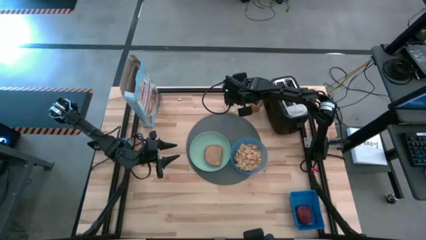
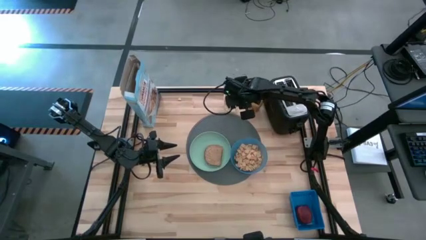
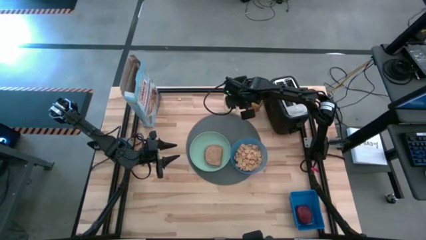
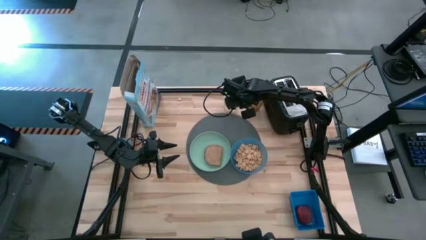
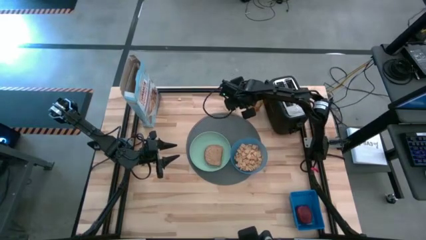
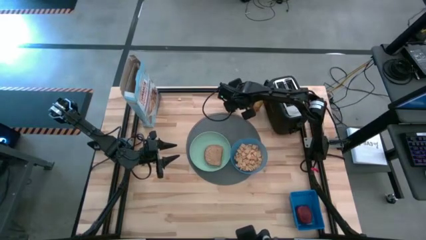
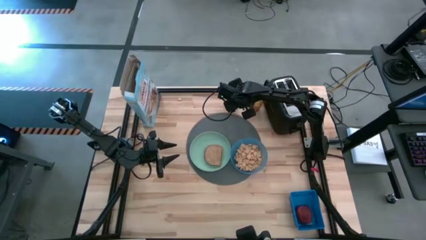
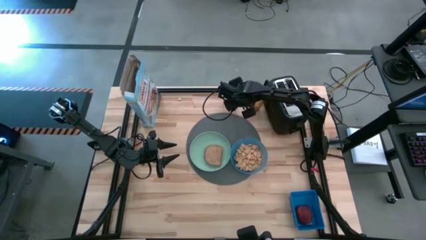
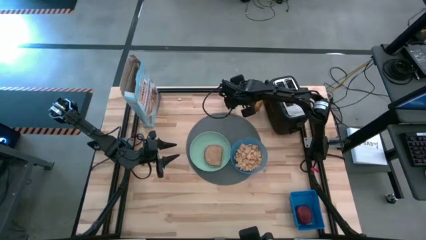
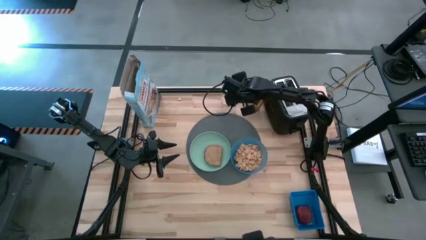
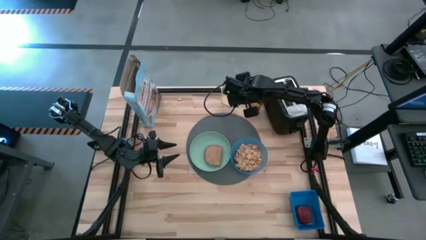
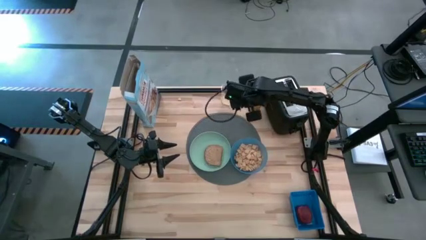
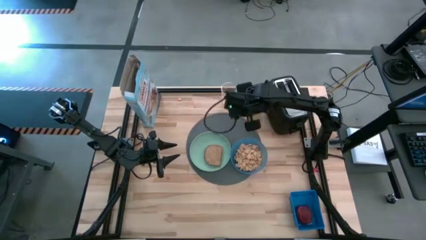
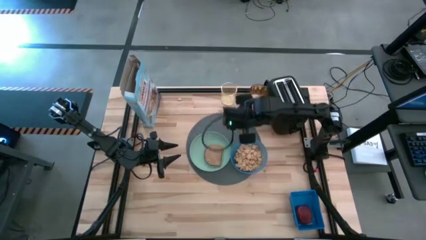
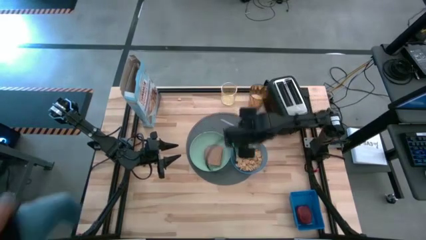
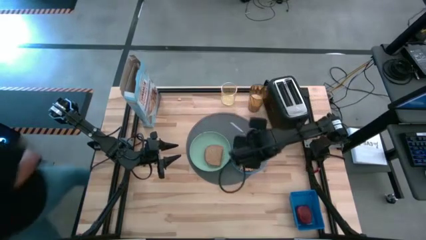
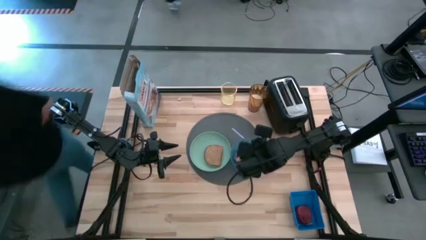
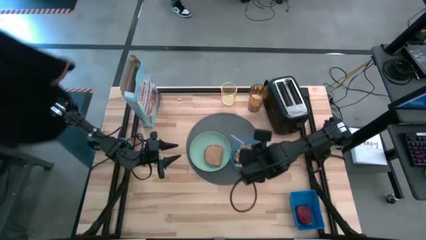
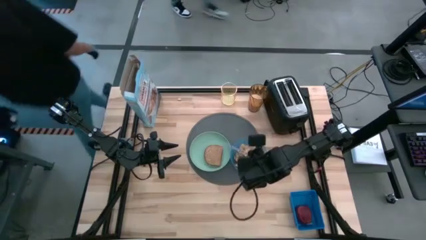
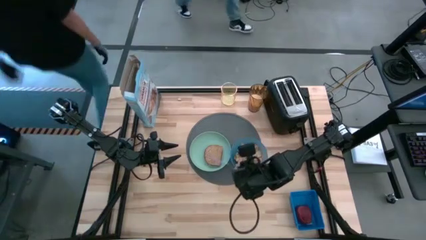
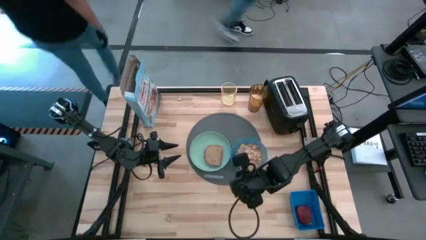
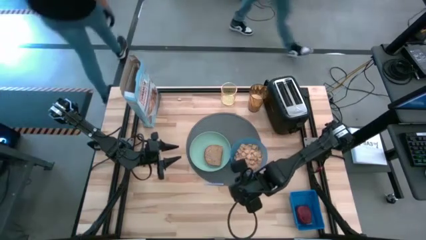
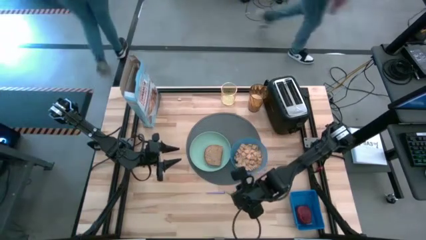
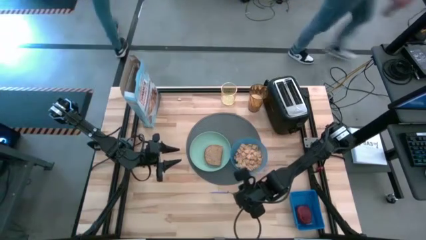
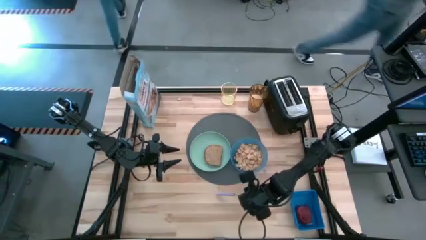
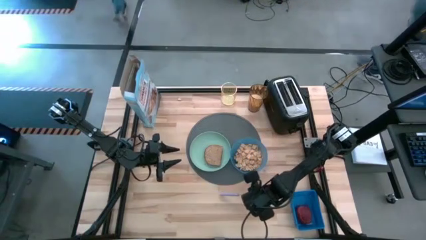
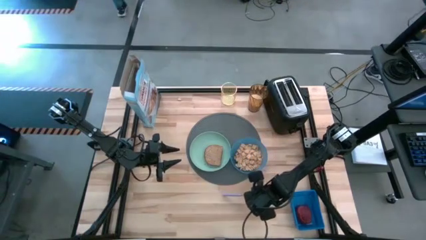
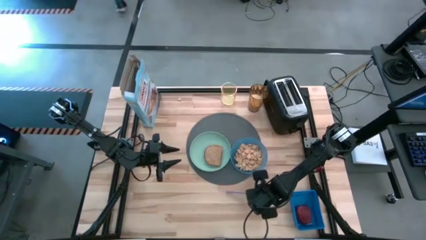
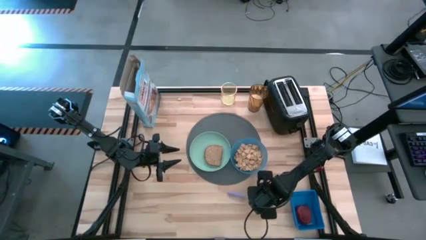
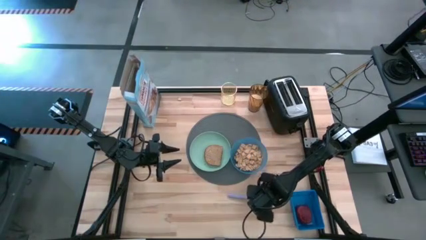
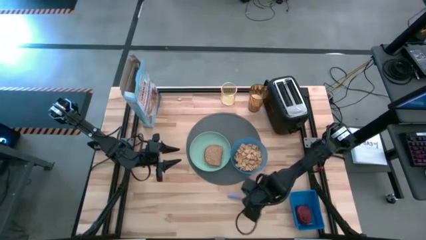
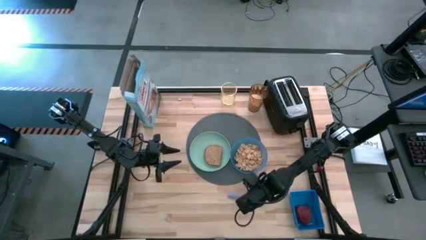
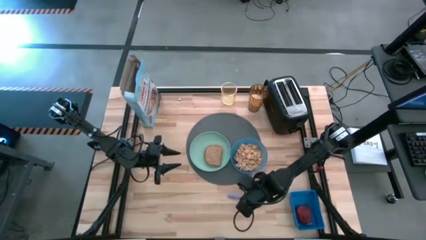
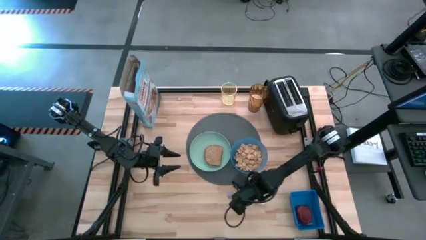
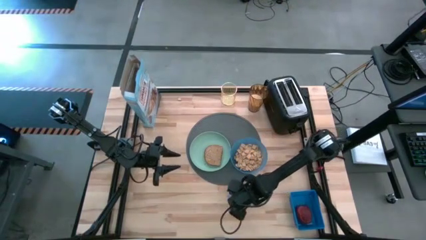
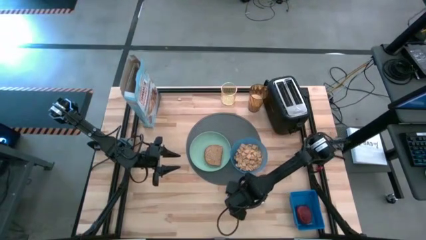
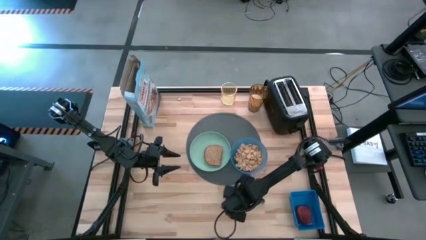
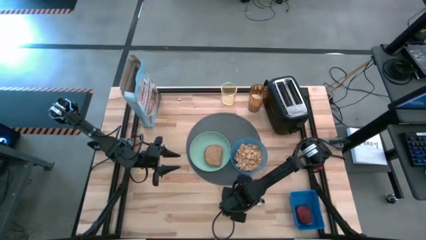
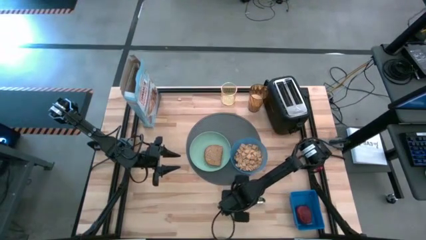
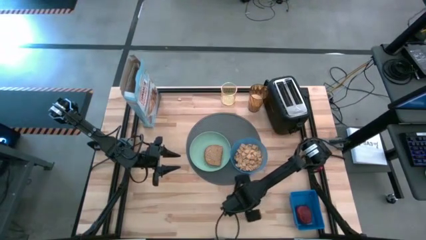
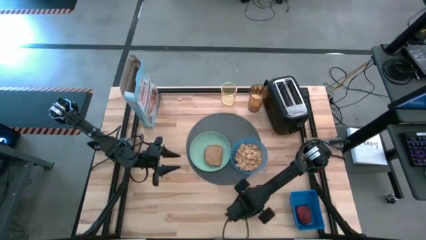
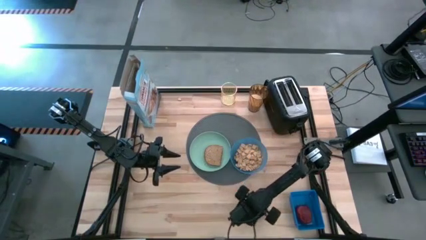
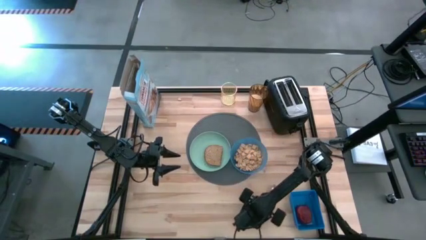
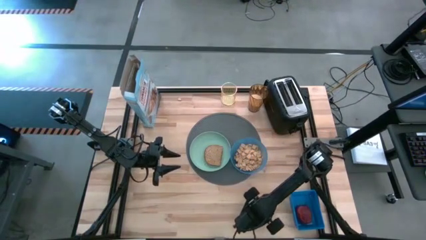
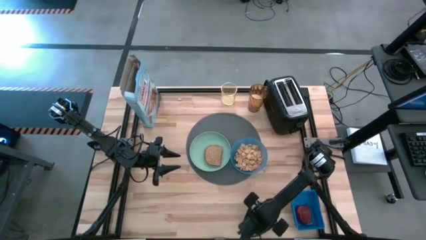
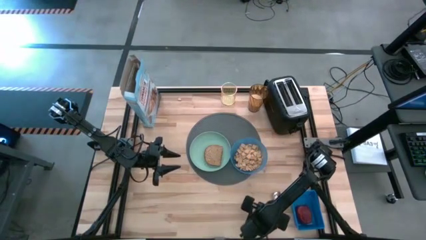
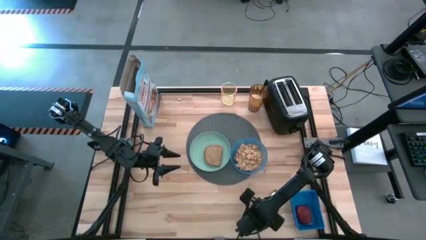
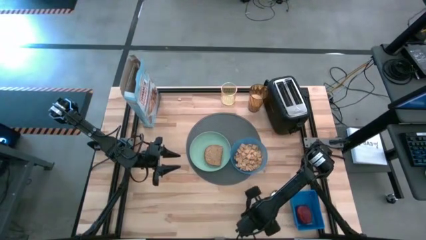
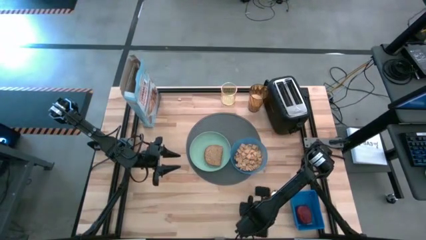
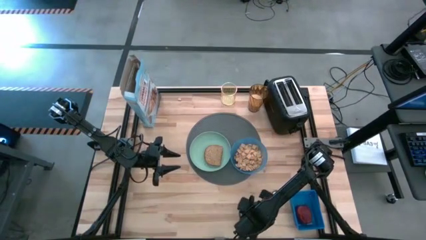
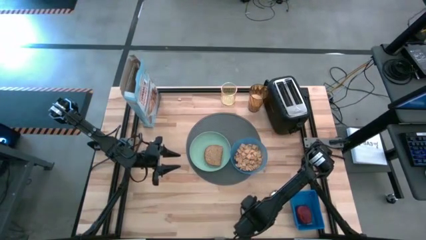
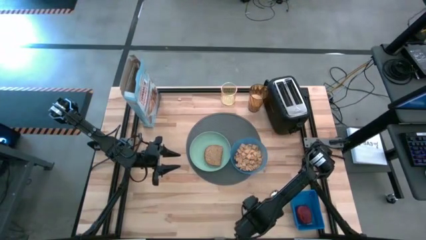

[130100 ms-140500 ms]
Task: Arrange a breakfast setting
Put the purple spoon on the table to the right of the blue bowl

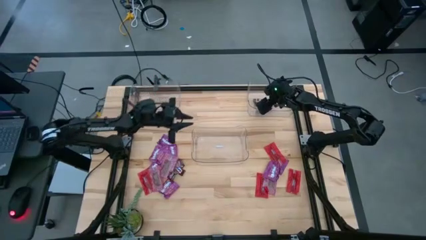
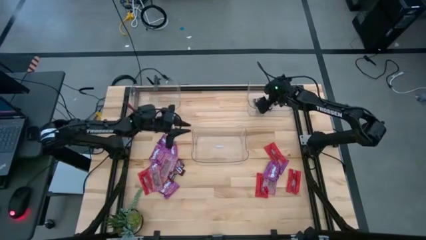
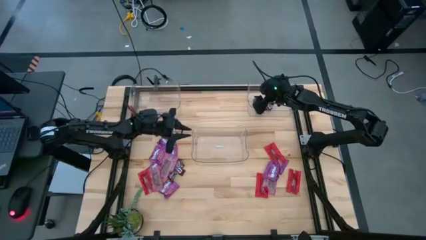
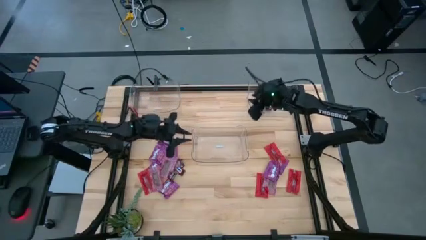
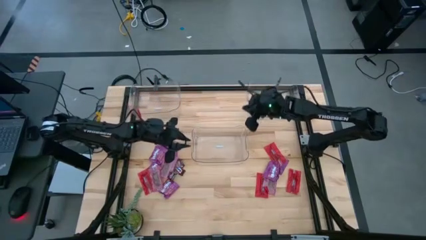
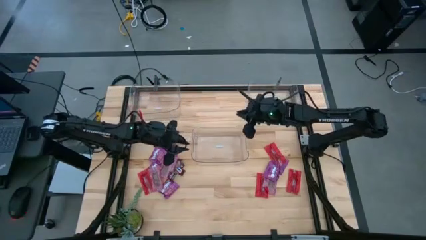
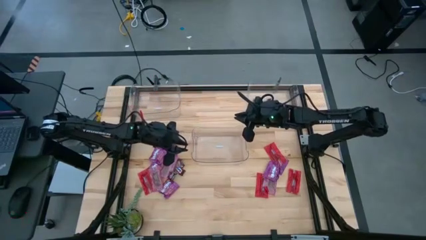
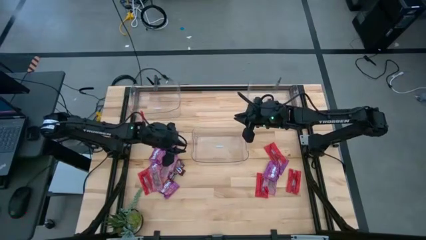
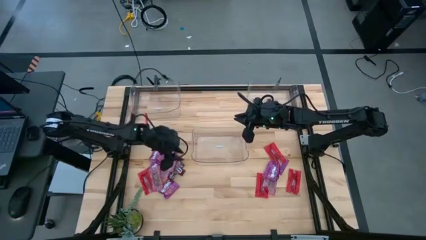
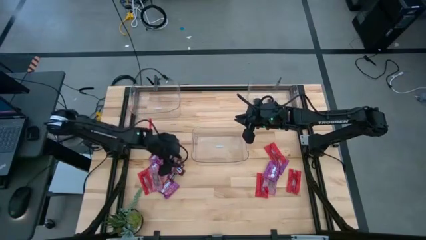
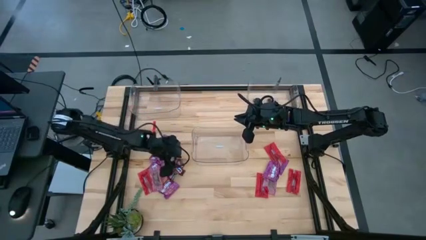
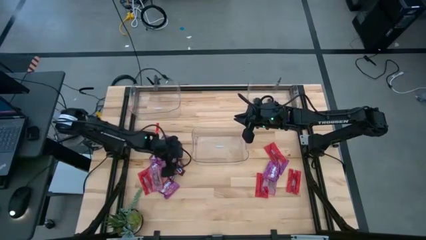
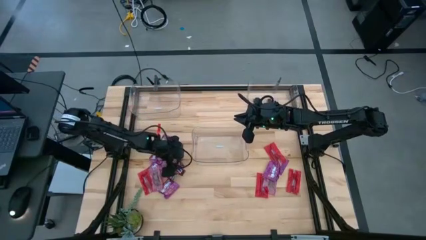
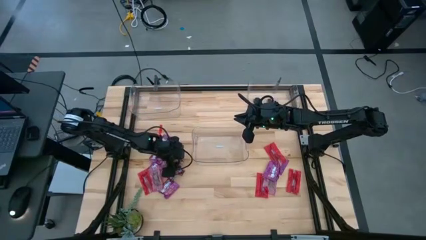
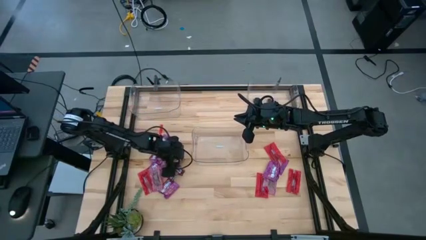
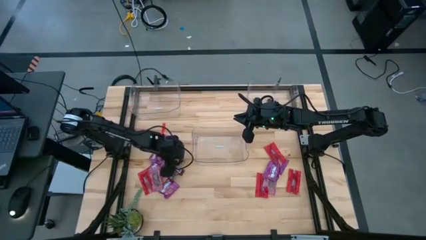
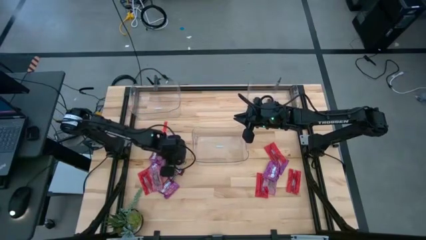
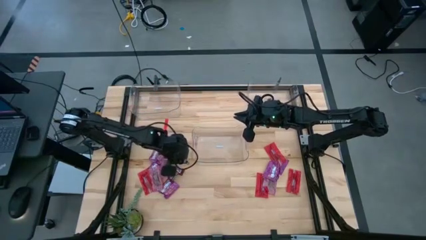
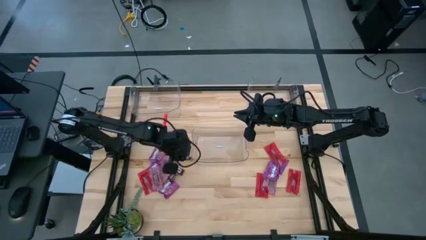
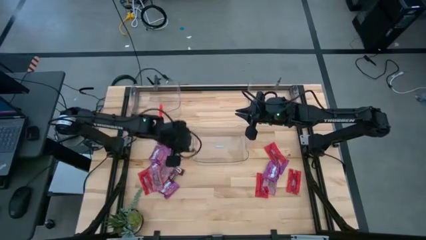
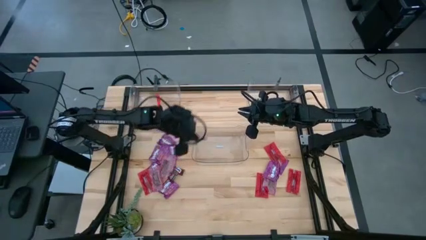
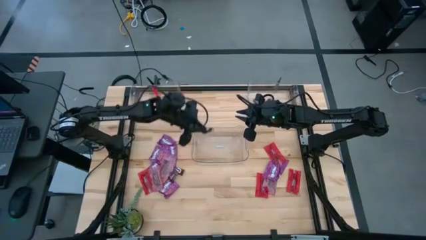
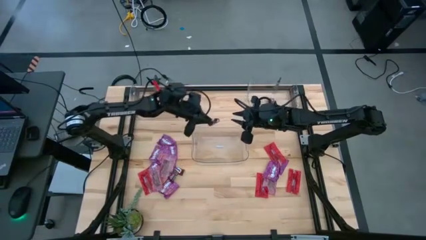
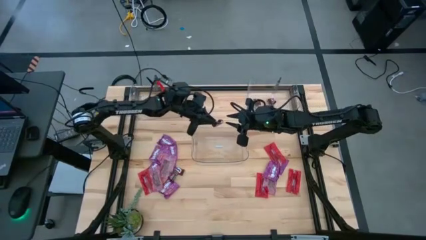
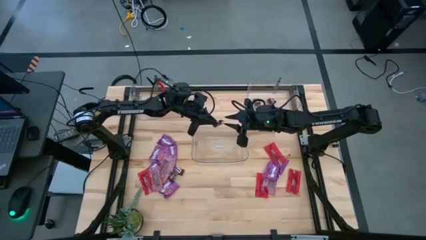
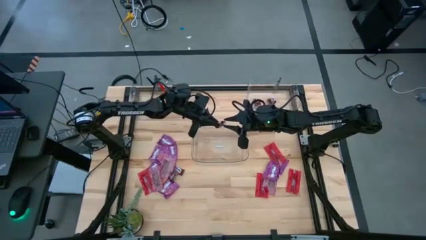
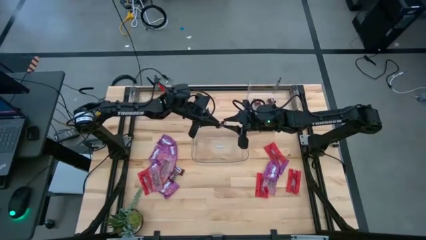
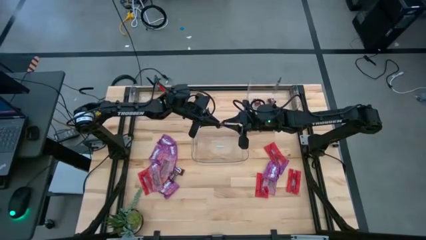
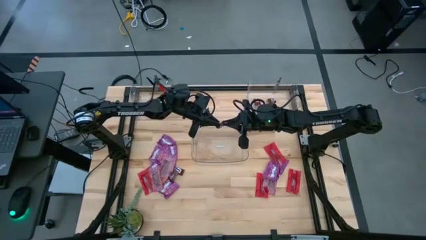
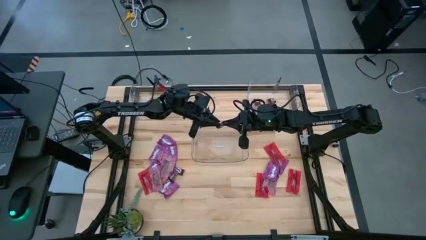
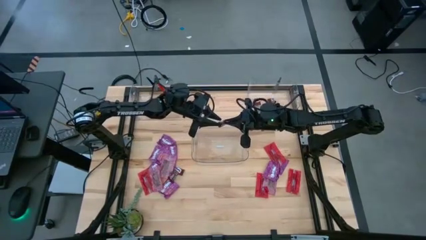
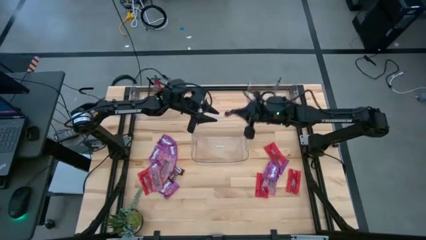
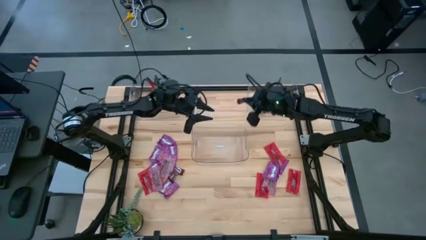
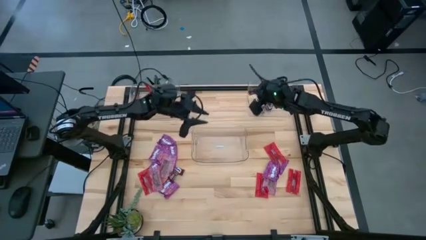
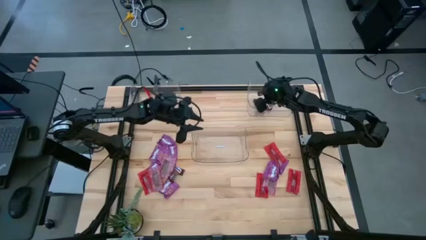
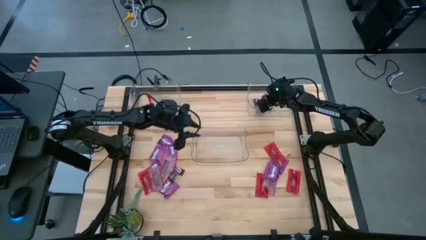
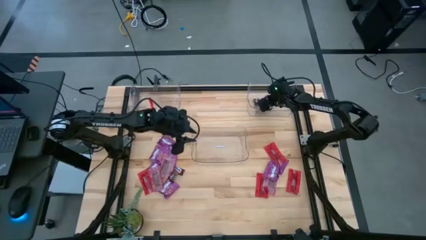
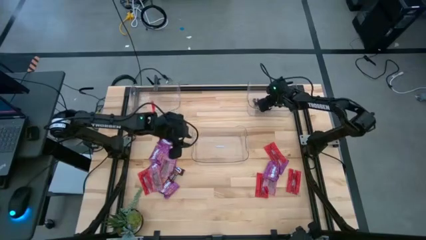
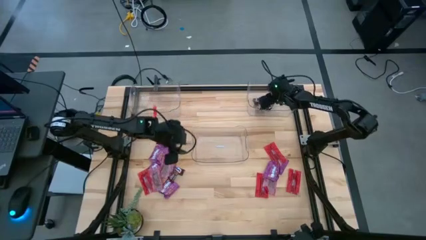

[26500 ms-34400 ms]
Task: Sort candy
Put the brown chocolate bar into the top right transparent bin
